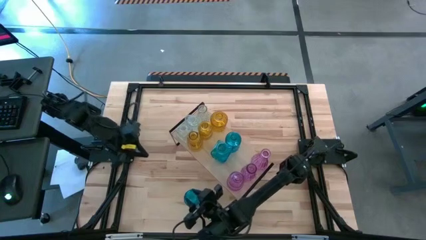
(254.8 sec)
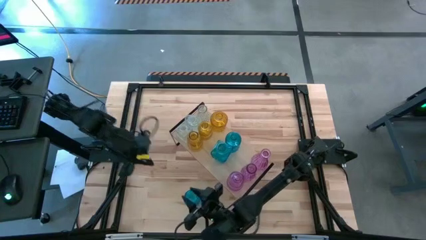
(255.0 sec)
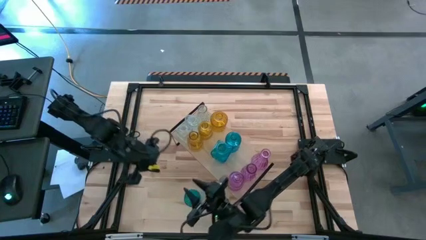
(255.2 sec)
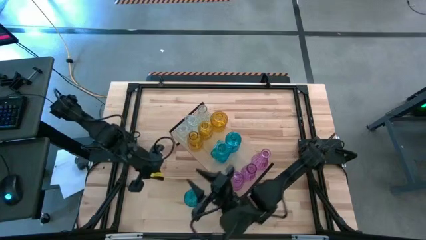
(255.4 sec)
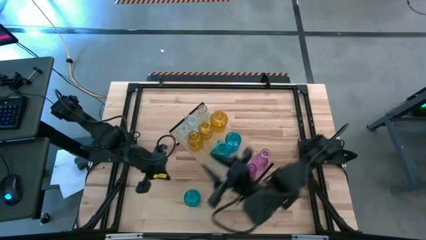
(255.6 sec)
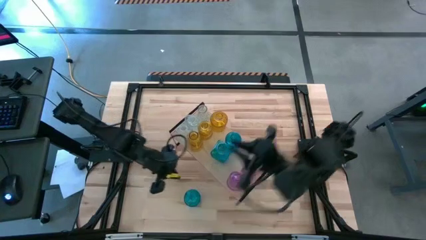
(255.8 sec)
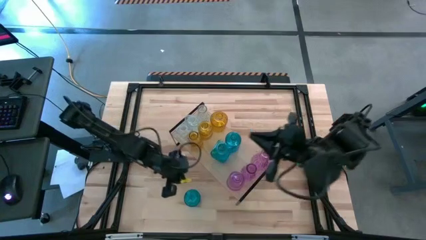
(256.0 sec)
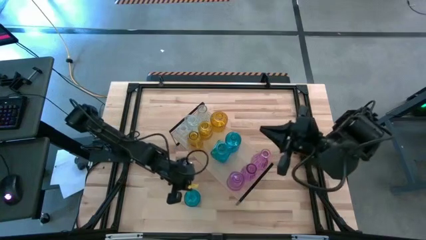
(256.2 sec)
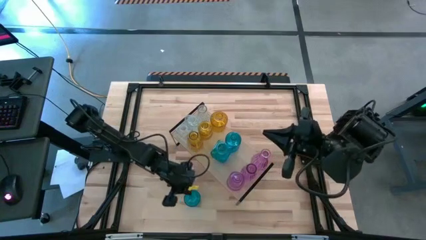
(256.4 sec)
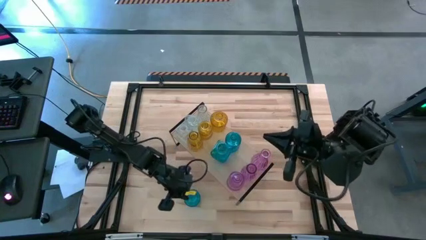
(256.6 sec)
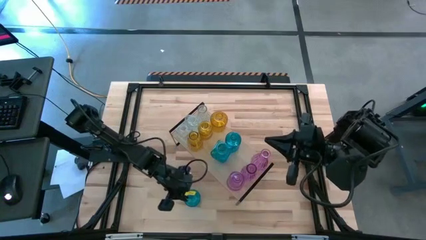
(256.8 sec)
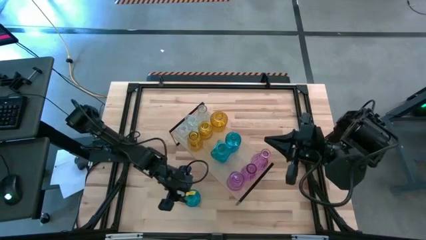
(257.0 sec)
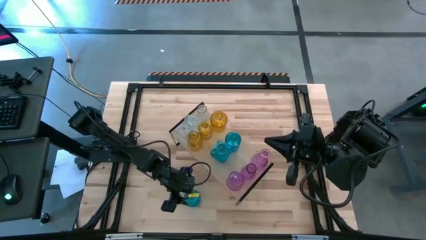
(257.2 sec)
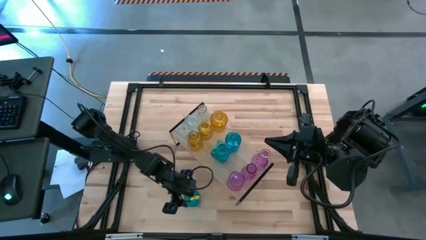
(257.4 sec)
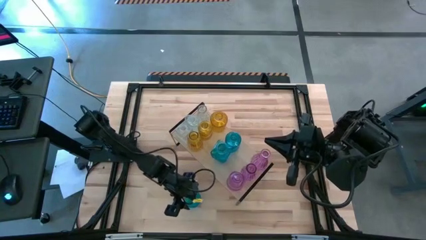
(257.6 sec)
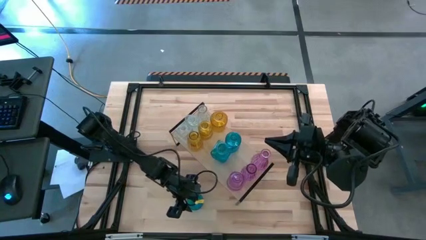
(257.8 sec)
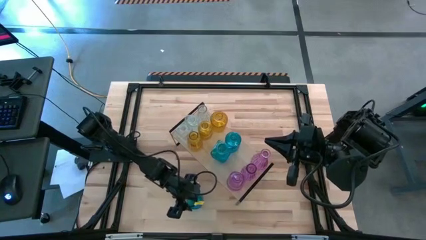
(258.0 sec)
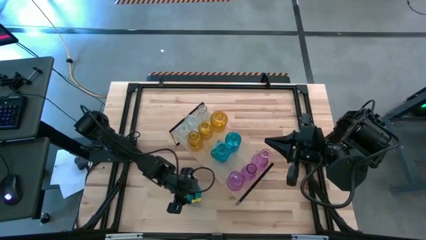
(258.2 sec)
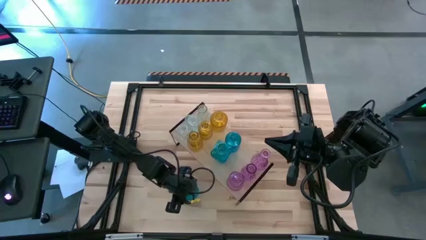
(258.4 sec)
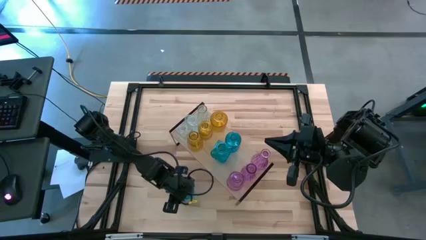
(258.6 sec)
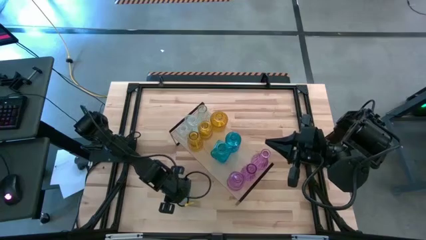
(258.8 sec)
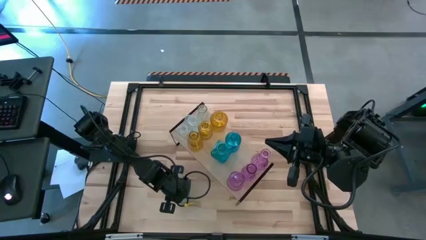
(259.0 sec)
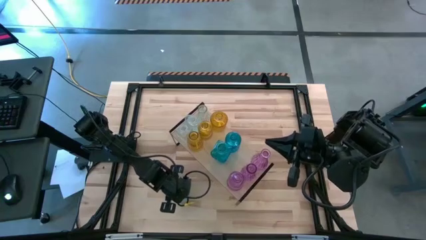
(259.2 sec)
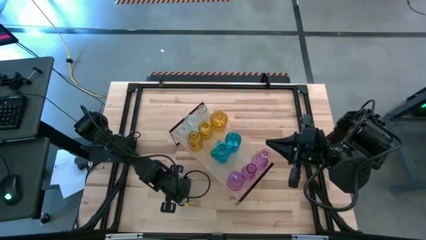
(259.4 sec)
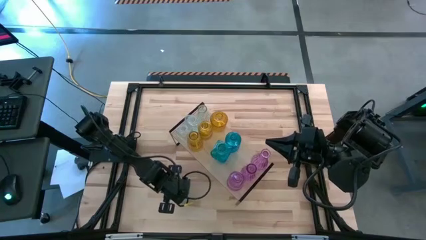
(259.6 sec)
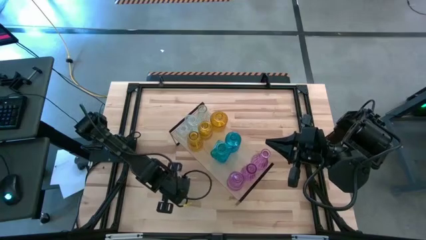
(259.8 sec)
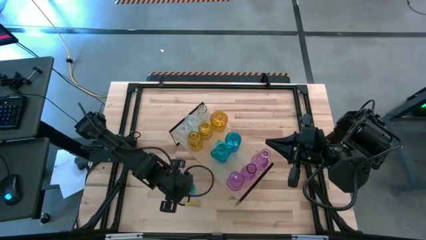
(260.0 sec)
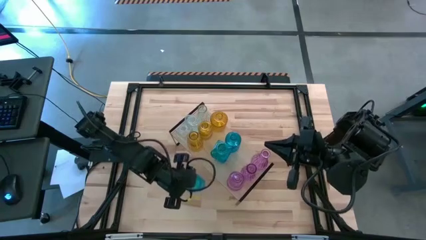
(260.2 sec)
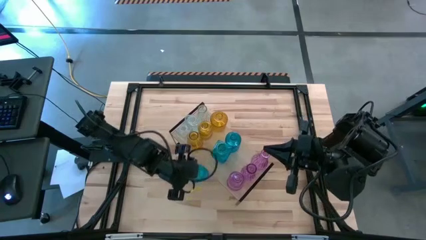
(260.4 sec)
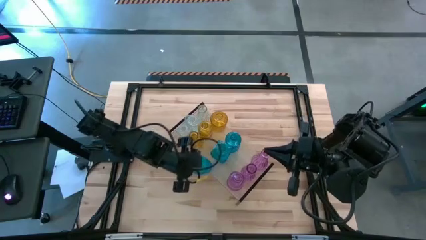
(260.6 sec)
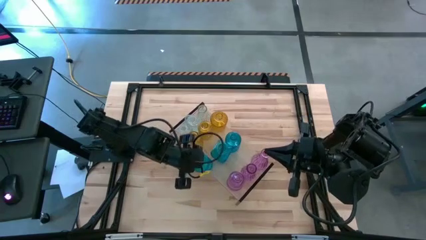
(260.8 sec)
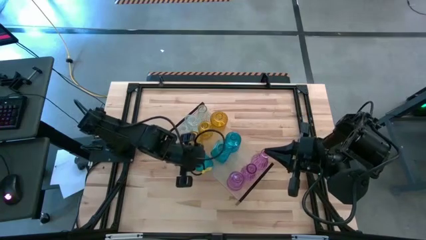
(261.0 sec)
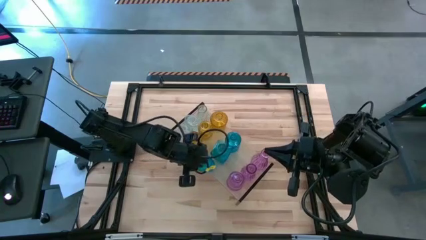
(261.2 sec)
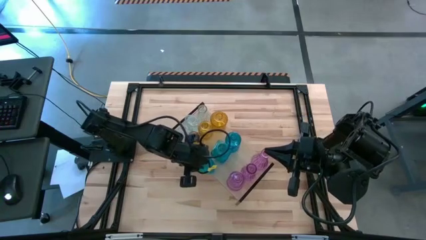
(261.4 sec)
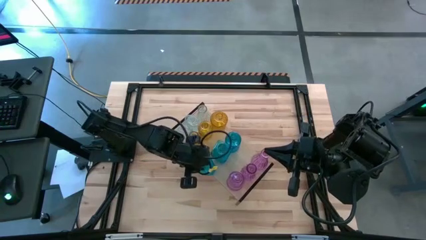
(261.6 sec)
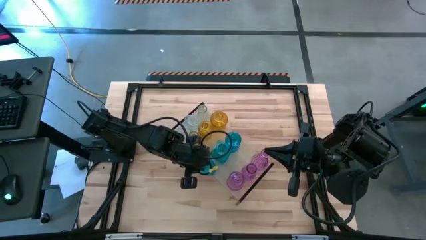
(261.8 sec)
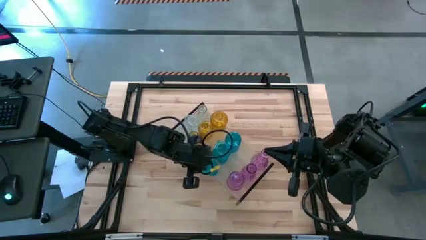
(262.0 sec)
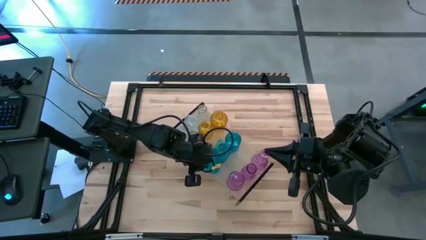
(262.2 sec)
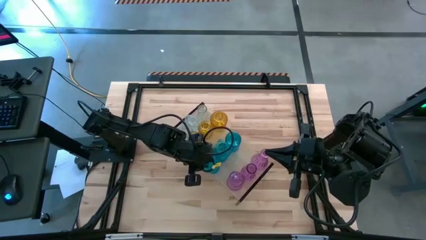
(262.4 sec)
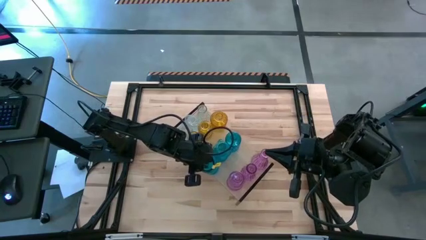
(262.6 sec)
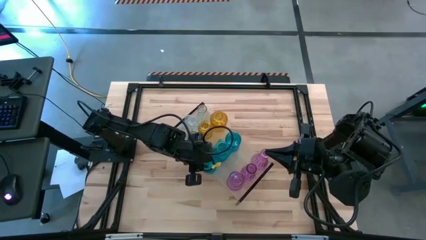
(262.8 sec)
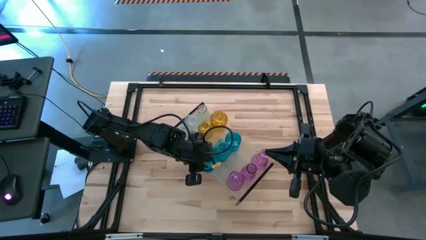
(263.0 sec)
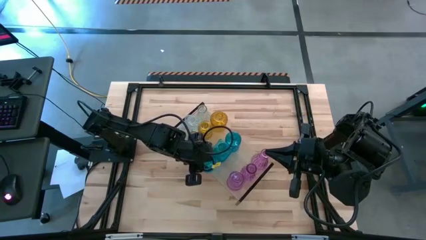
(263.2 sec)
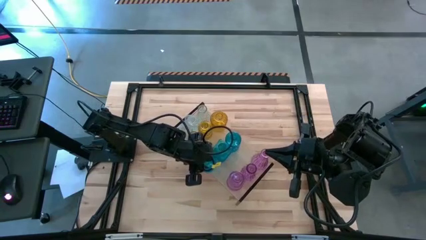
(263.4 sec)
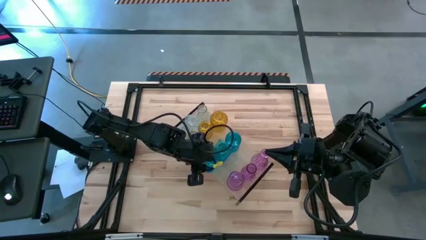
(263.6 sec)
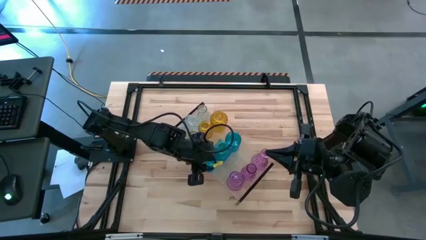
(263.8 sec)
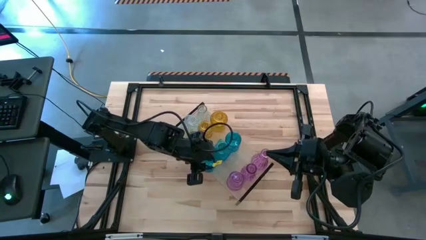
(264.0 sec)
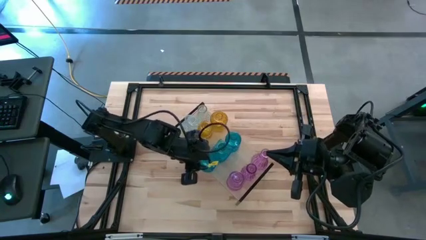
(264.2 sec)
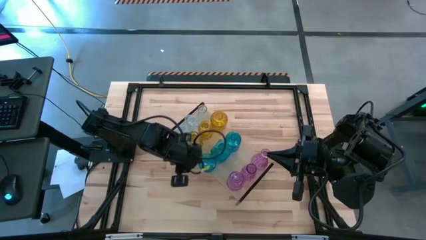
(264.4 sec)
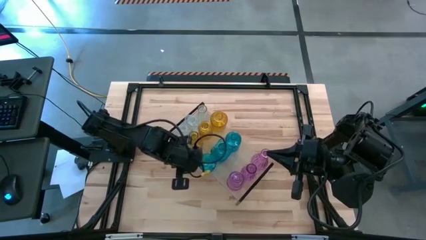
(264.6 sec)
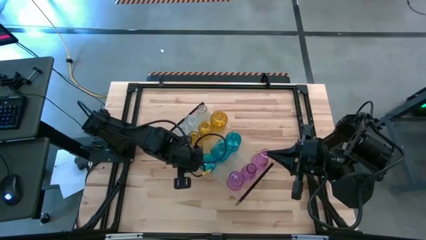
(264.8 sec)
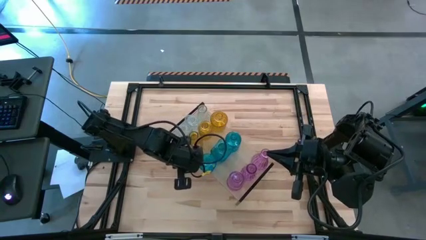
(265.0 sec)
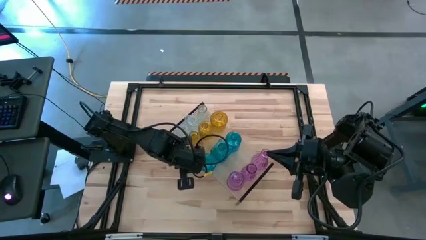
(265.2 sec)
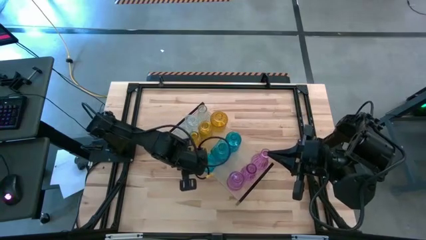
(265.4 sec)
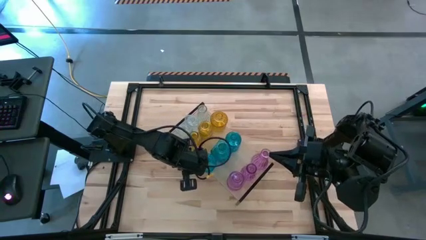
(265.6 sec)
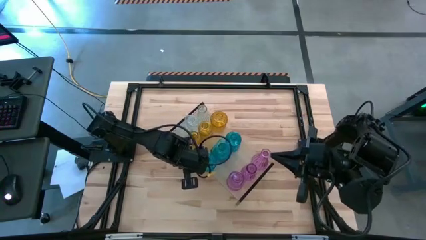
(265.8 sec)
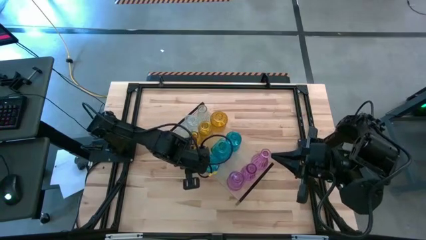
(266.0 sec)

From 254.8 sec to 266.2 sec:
Task: sort vases onto shelf
Put the blue flower vase on the shelf aligned with the other blue flower vases

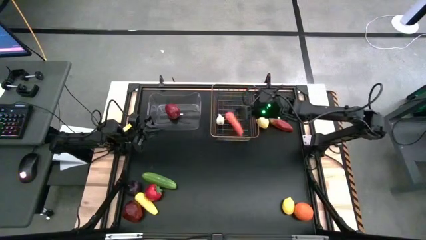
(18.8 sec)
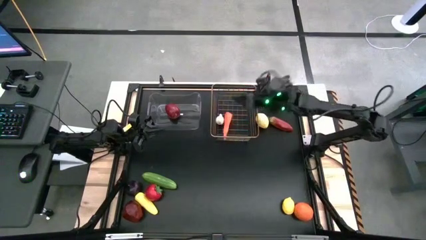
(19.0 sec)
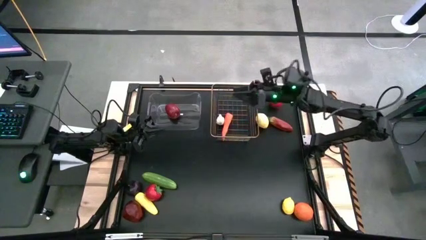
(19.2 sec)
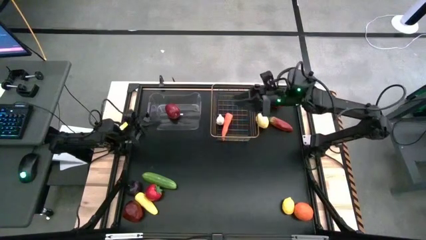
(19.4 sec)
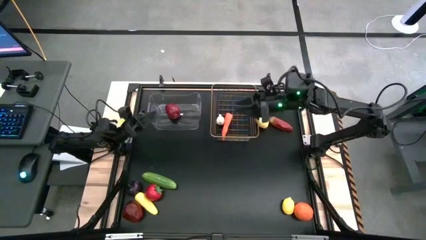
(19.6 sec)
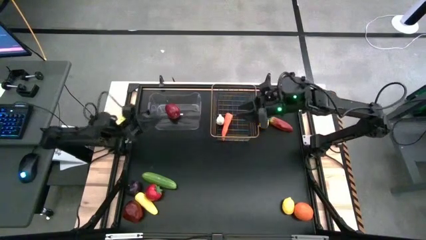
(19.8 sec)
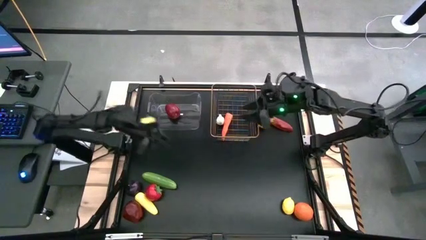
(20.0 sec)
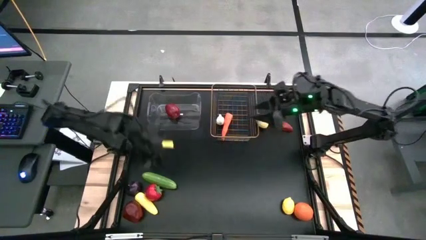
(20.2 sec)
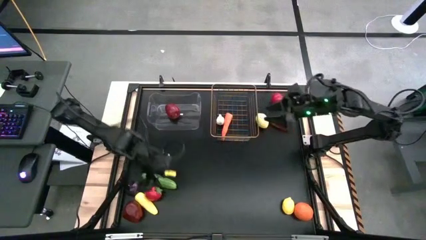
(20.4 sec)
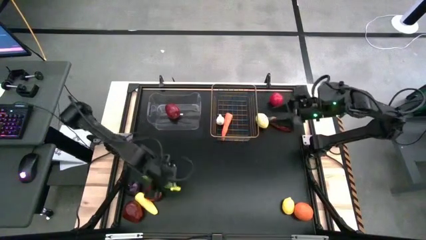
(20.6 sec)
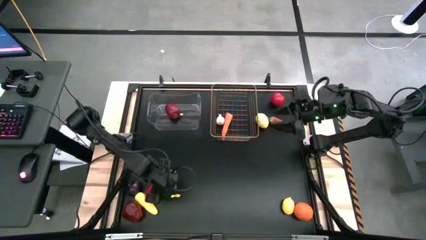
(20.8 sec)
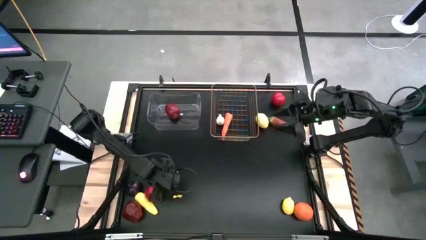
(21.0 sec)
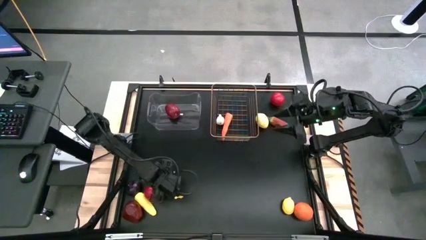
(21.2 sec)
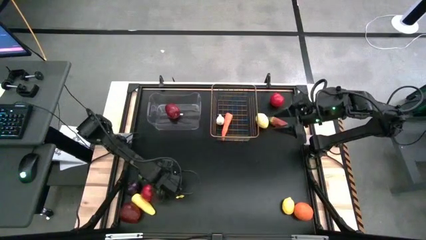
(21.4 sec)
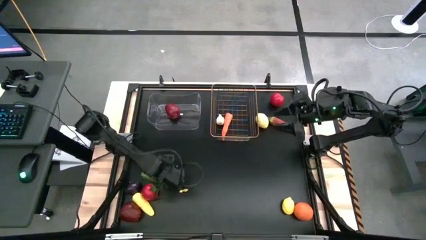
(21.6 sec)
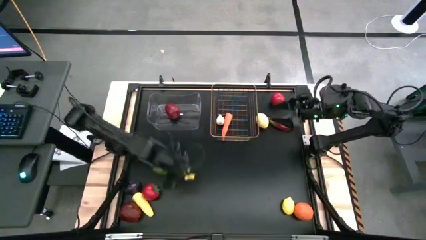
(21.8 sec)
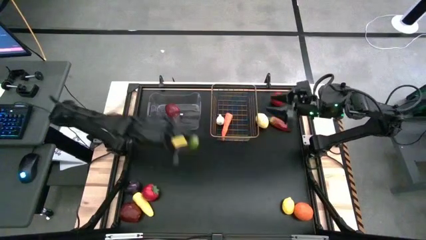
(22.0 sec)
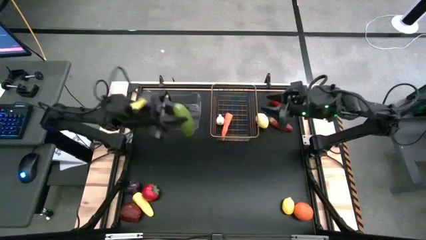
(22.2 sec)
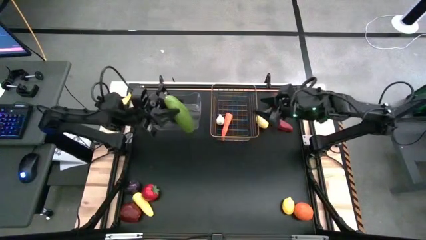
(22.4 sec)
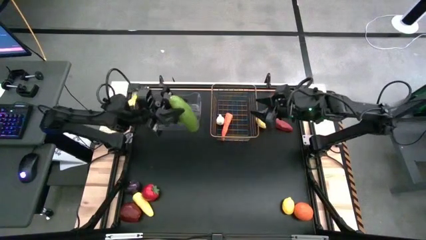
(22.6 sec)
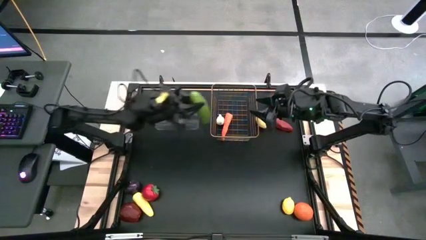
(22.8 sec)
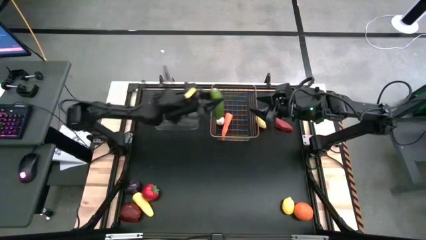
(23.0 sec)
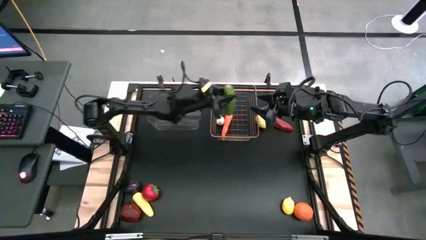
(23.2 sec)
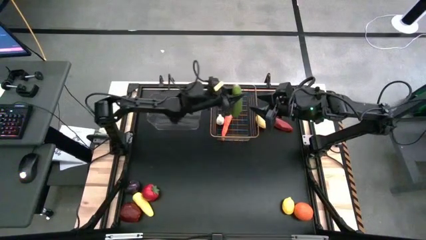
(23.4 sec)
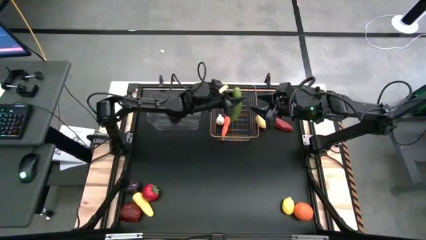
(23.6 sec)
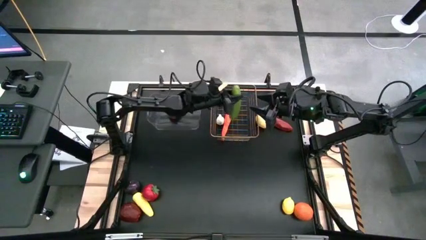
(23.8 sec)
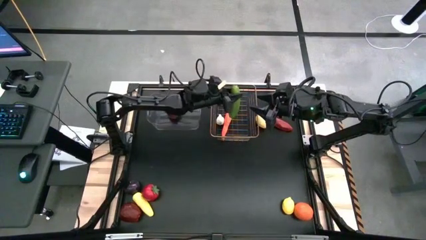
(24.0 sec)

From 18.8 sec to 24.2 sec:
Task: Sort produce into baskets
Put the cucumber into the gold wire basket
